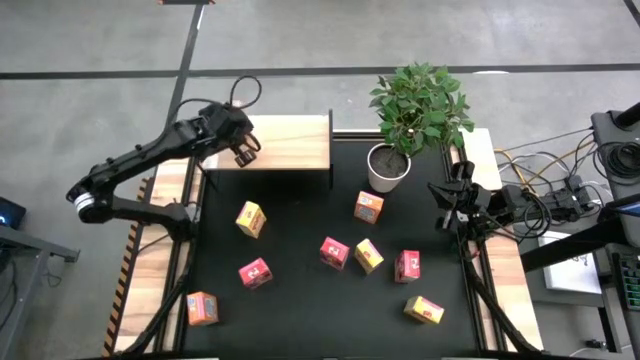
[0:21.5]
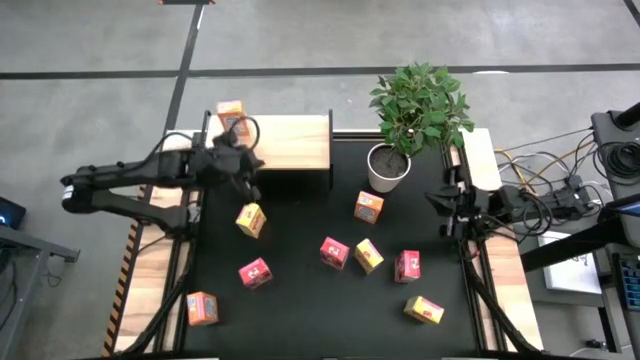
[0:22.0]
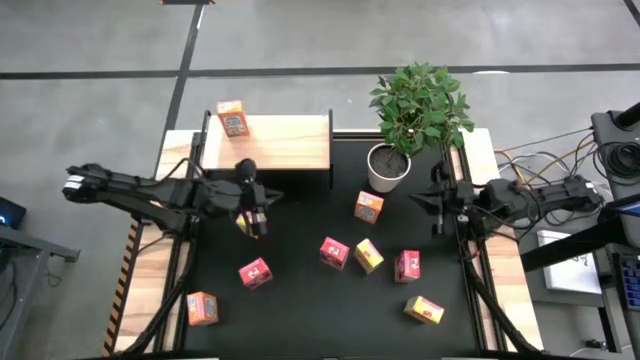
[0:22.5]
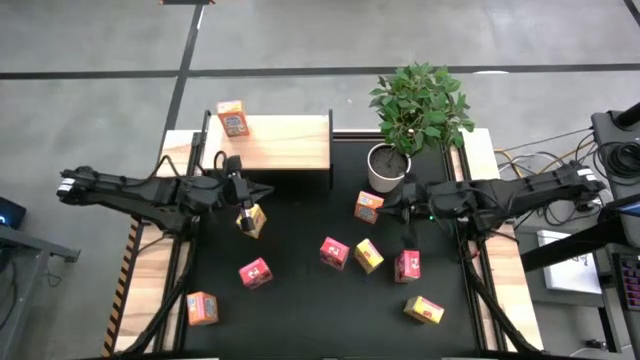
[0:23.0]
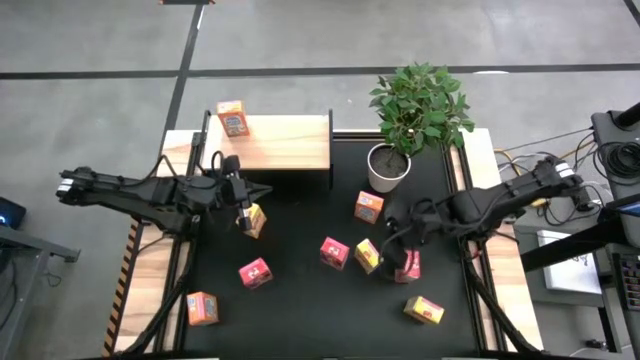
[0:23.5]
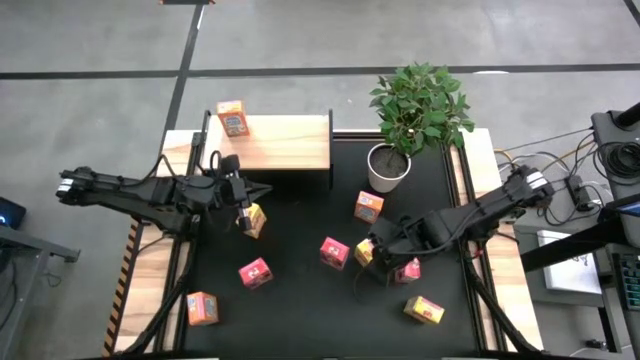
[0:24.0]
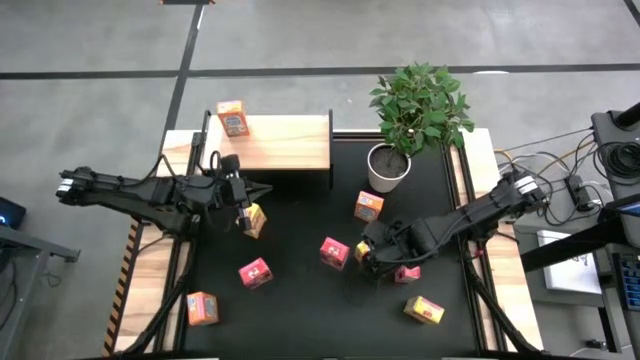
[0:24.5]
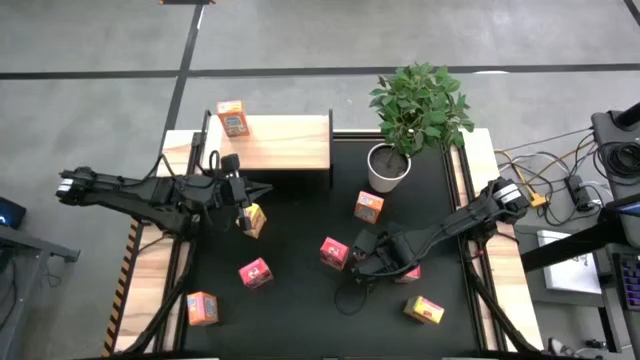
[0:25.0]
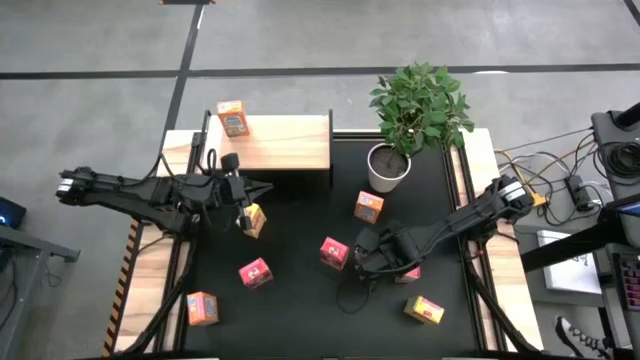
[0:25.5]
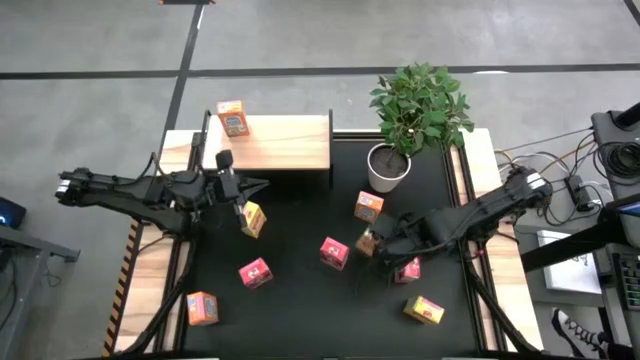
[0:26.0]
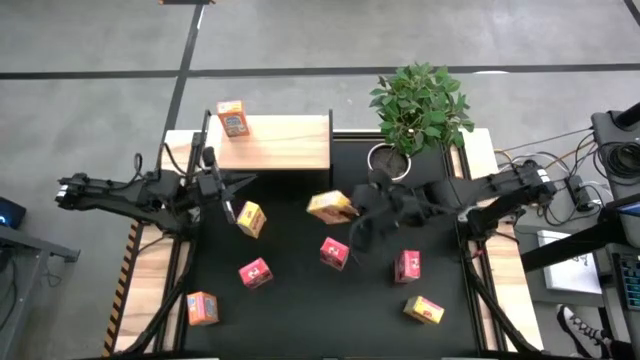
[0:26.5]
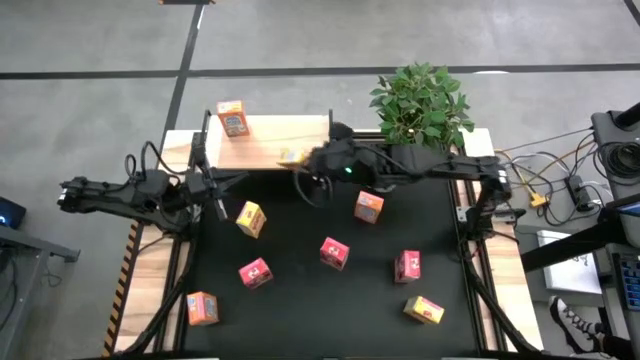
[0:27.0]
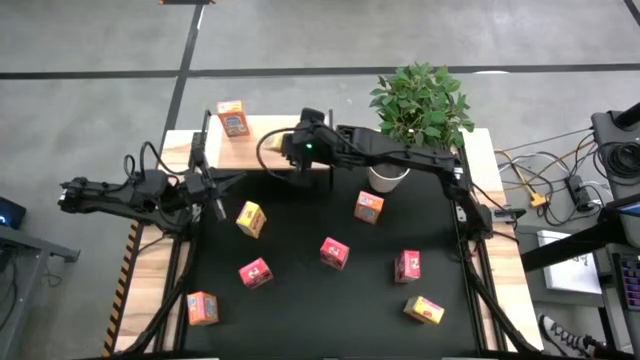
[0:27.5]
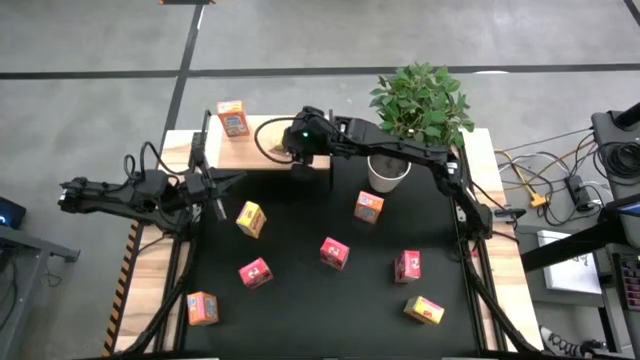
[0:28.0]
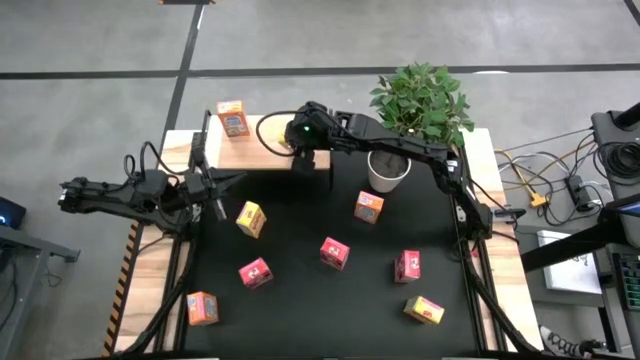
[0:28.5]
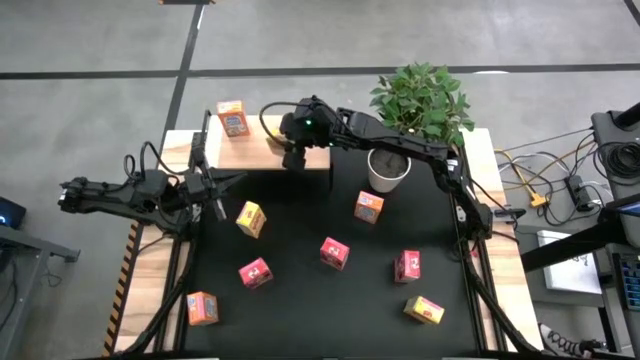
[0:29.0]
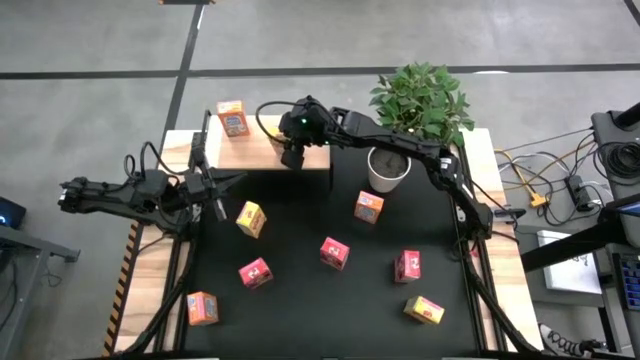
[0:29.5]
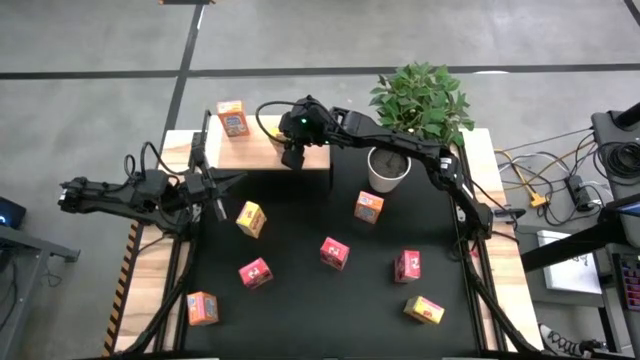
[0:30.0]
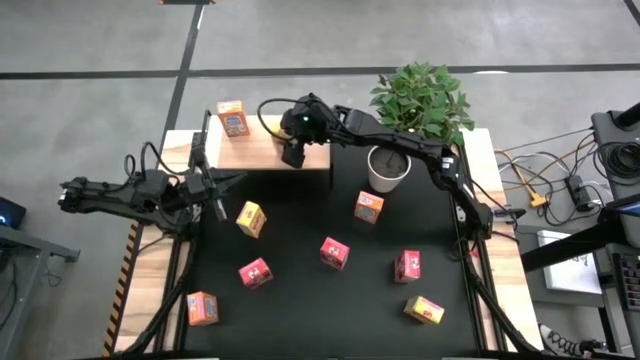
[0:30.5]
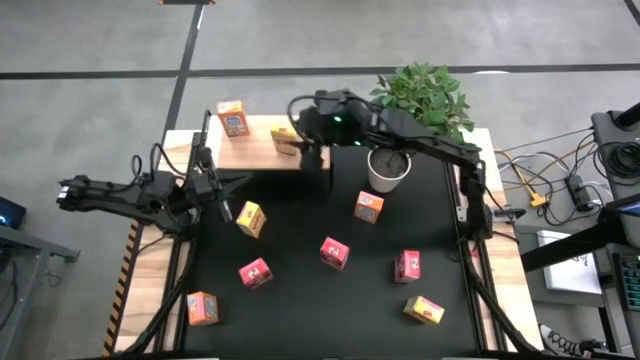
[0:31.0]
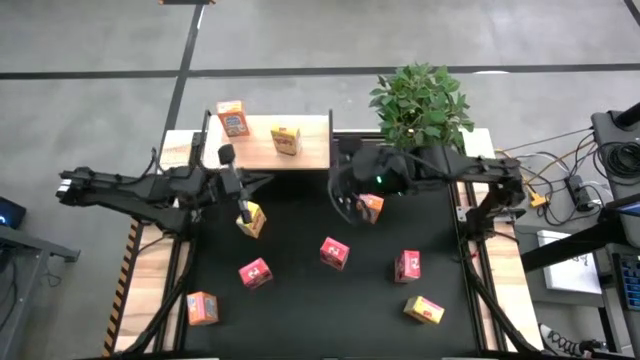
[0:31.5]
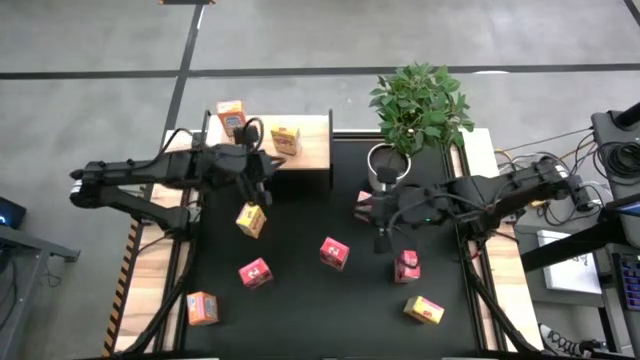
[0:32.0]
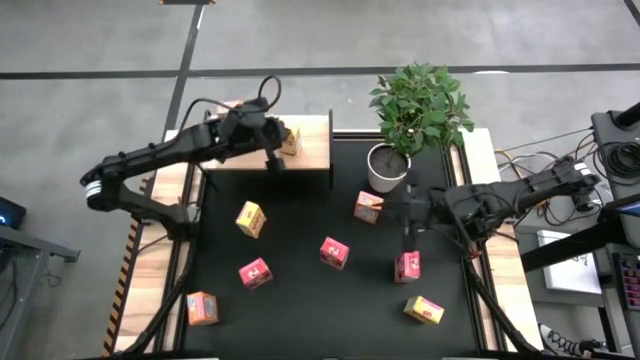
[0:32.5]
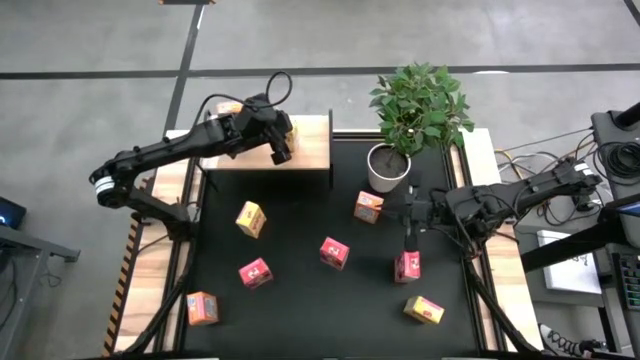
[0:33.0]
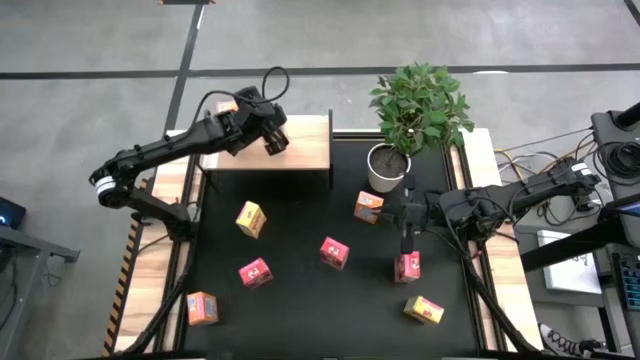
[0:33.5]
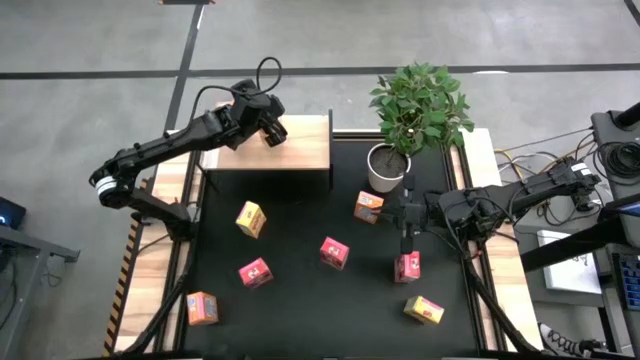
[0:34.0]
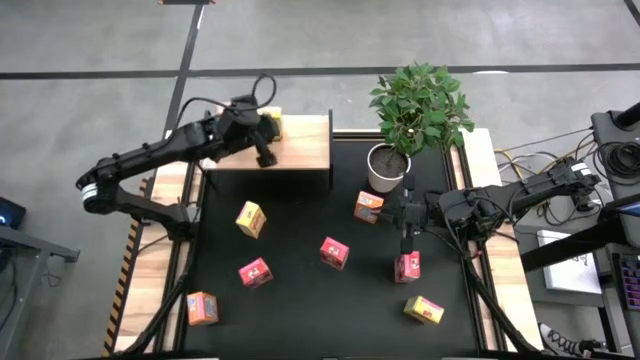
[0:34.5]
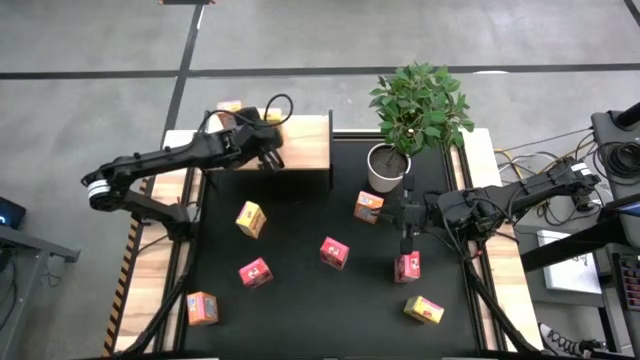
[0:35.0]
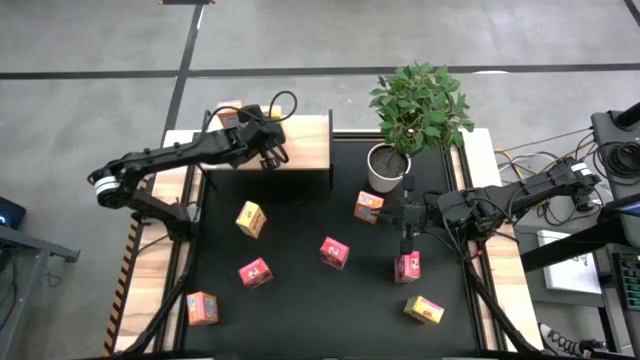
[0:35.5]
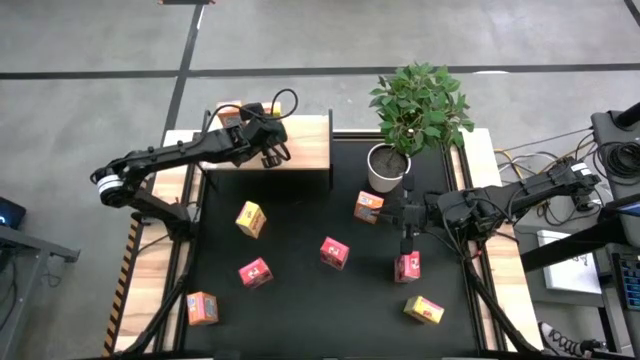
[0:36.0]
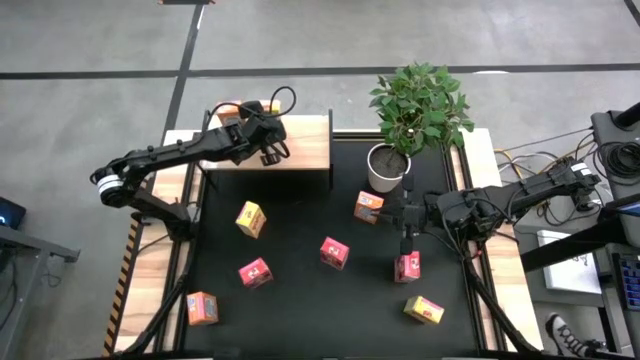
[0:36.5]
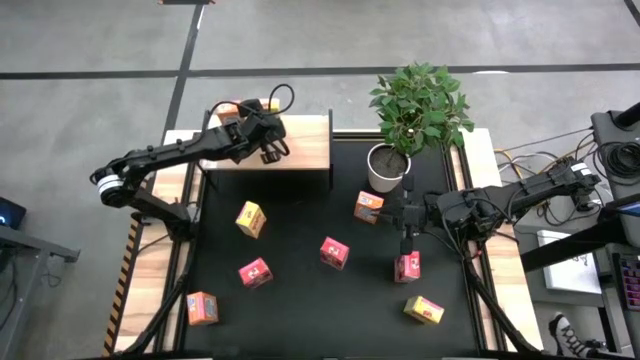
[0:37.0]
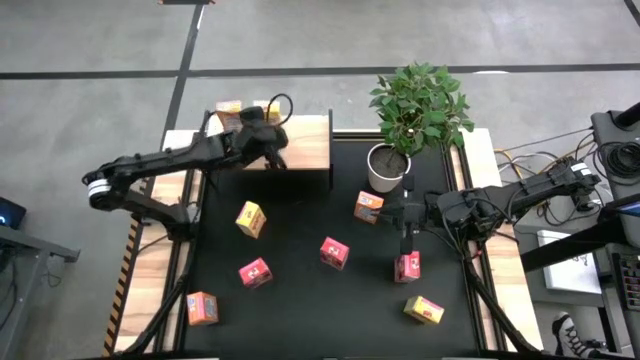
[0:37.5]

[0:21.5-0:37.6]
Task: Stack cereal on shelf
Put the center yellow cereal box on the shelf

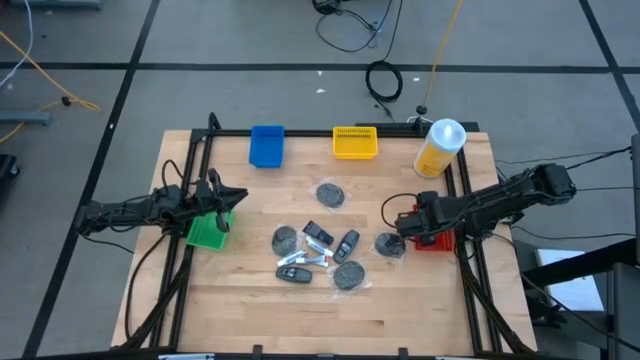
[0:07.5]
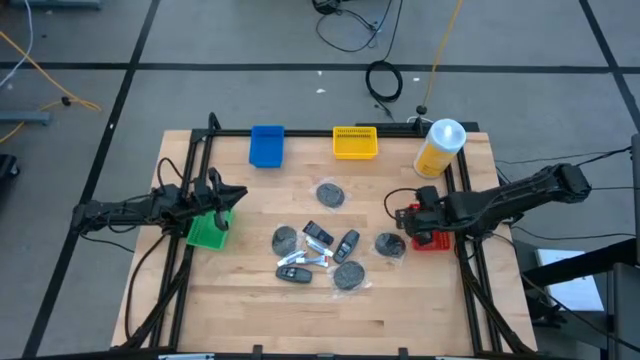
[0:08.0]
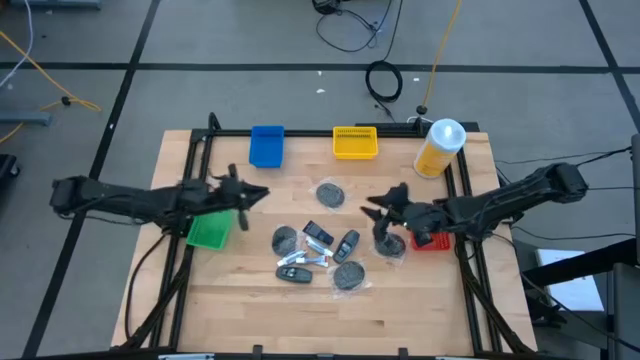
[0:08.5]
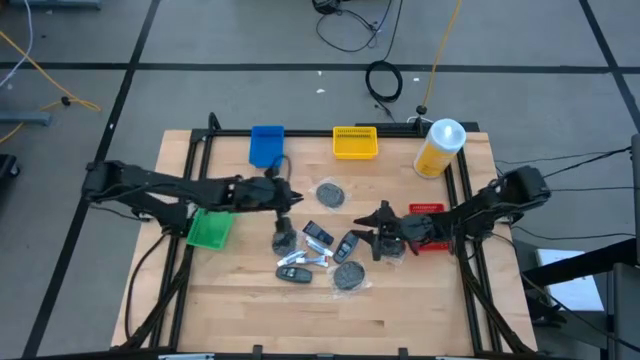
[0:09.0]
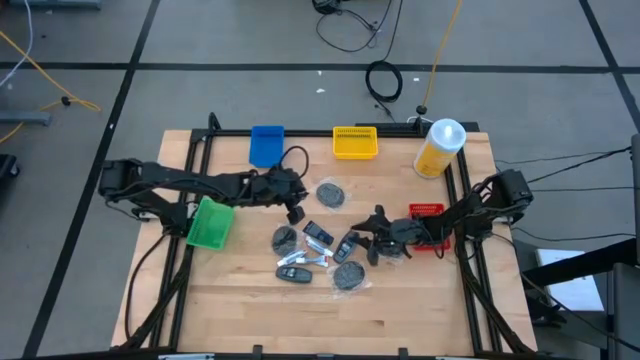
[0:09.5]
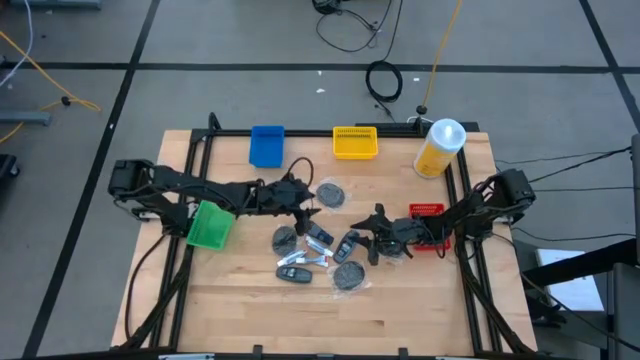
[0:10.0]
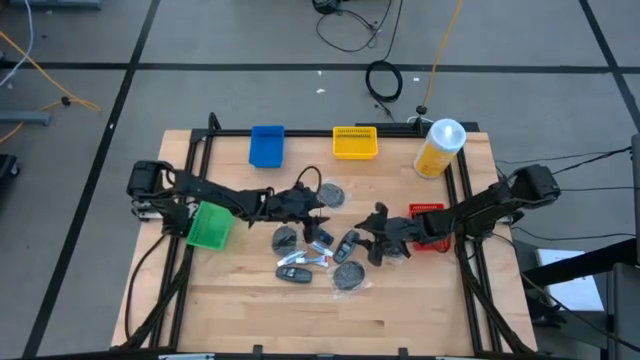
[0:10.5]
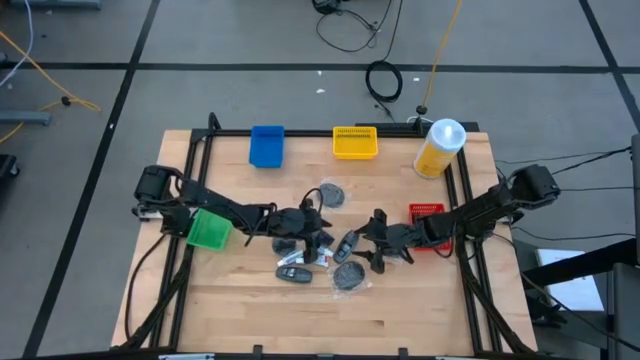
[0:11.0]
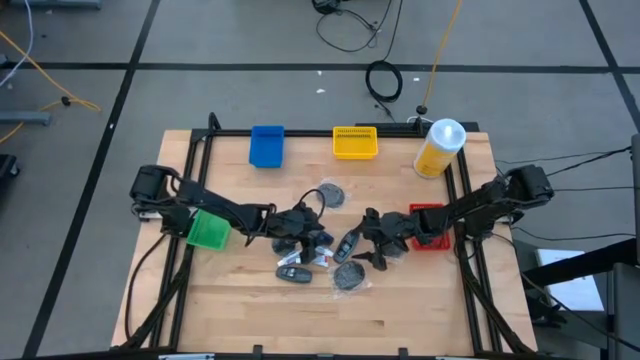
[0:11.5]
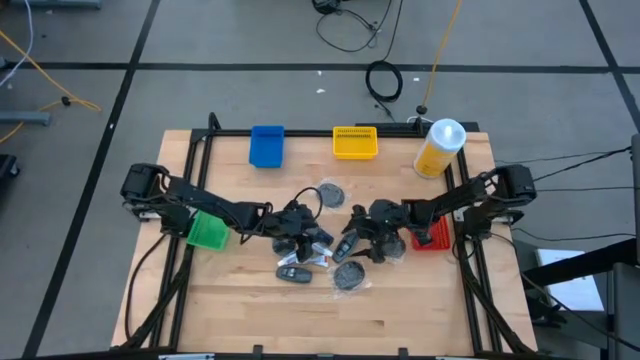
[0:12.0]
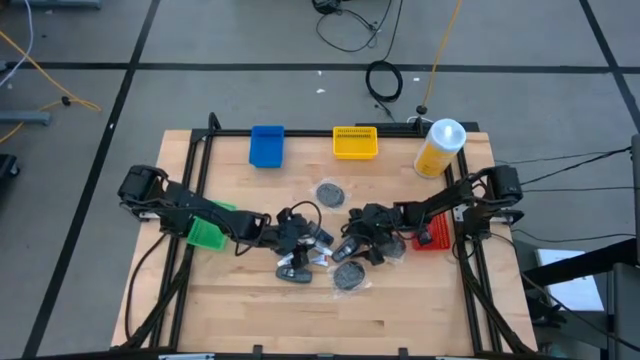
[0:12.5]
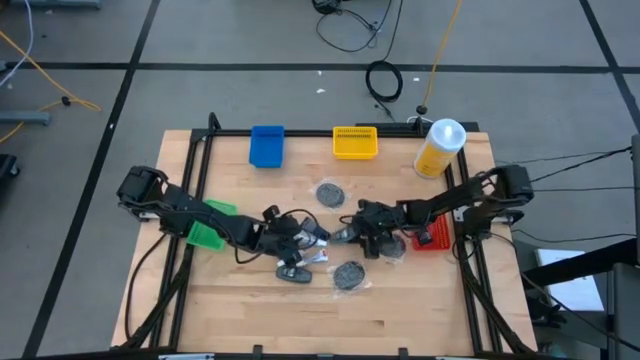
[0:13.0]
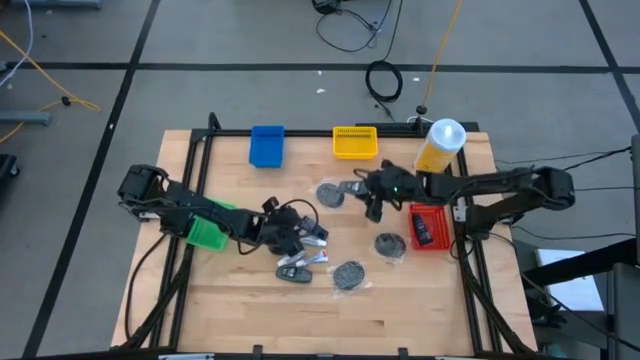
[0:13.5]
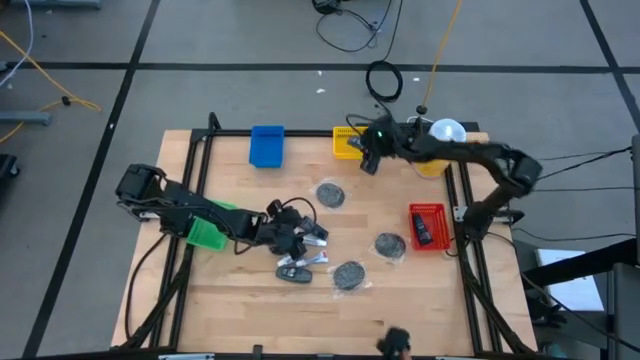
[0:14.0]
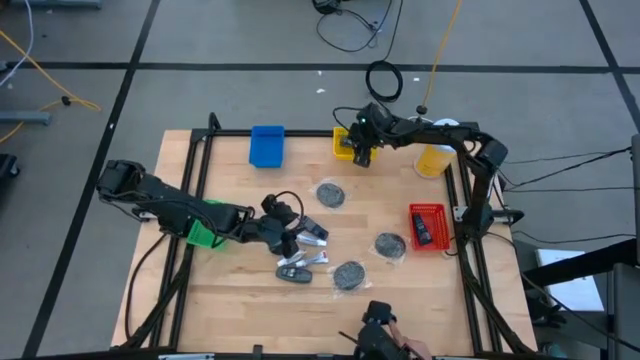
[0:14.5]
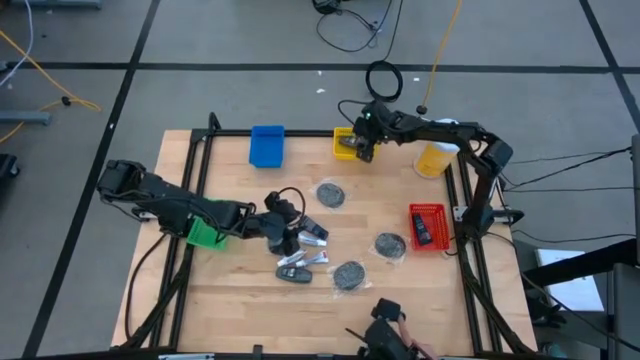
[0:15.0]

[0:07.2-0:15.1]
Task: Pick & Place Travel size toiletries
Put the gray deodorant into the yellow bin
